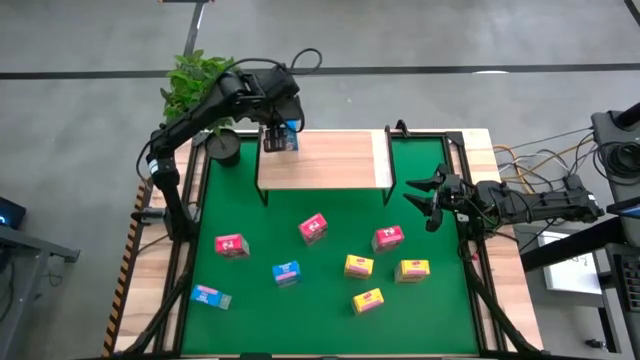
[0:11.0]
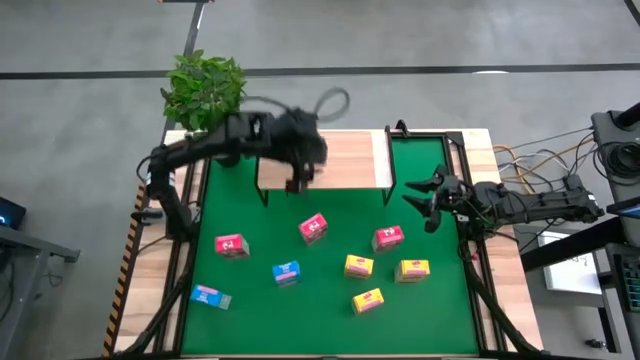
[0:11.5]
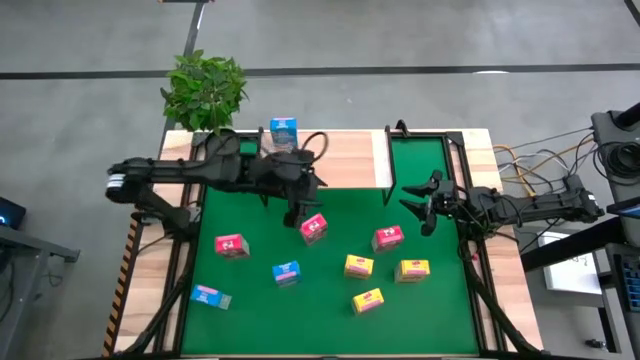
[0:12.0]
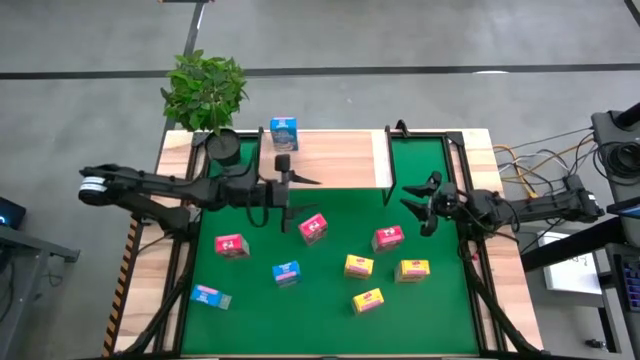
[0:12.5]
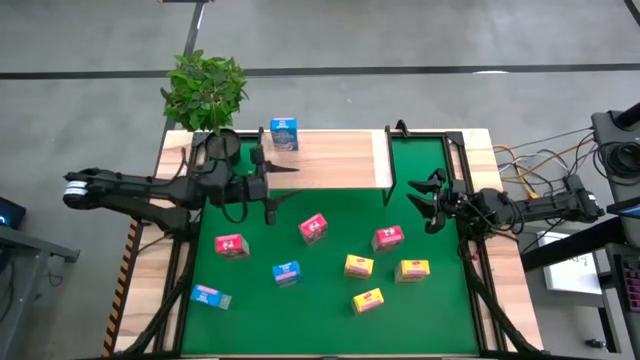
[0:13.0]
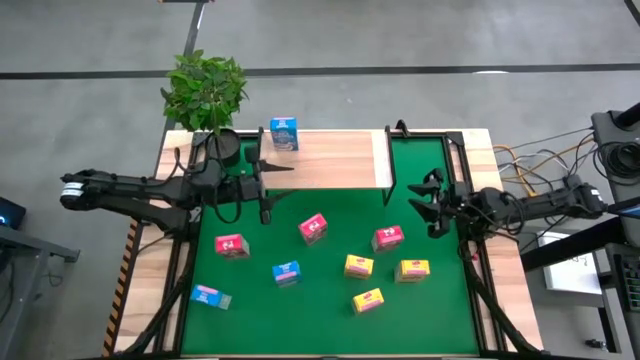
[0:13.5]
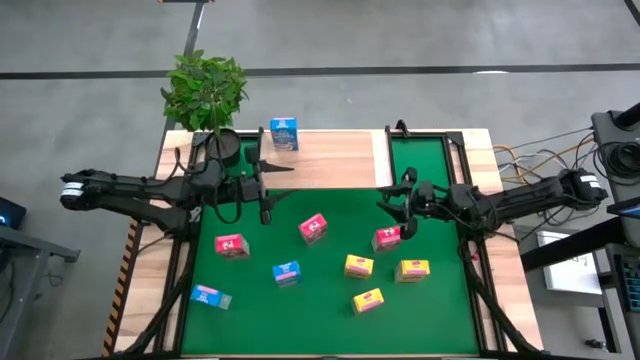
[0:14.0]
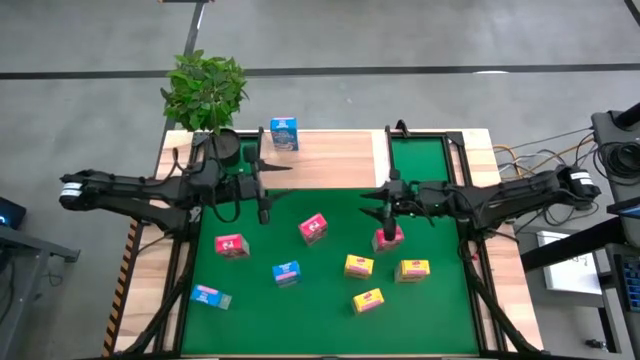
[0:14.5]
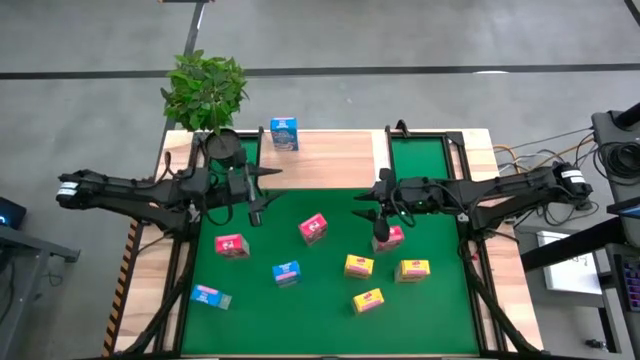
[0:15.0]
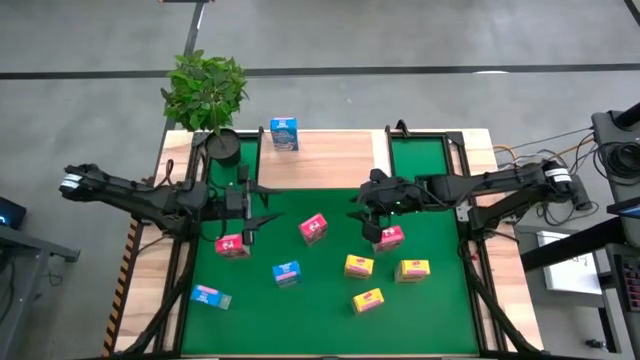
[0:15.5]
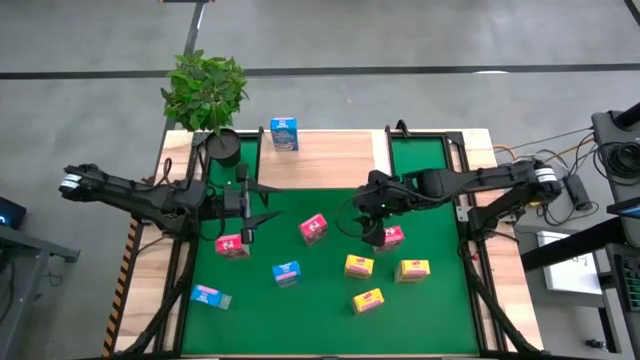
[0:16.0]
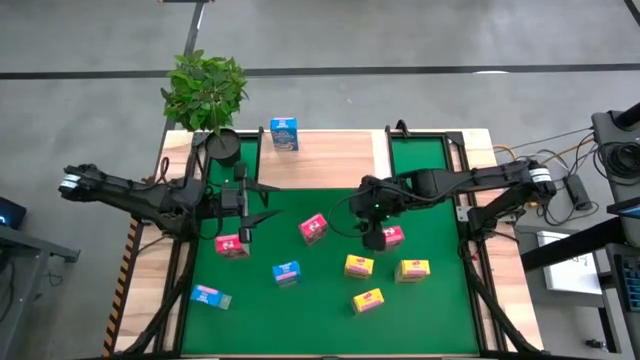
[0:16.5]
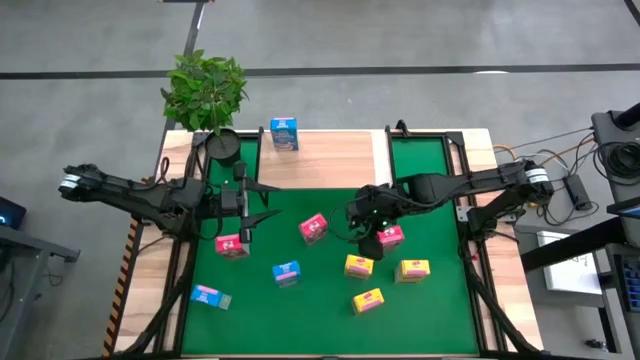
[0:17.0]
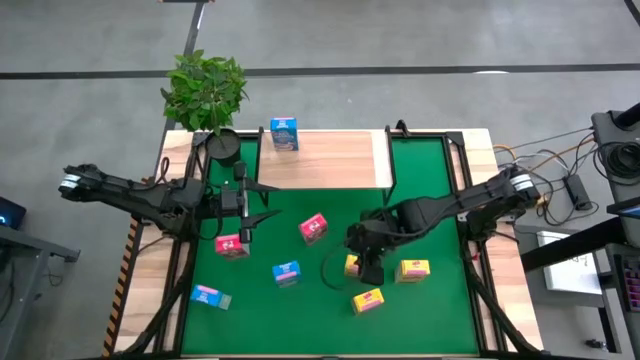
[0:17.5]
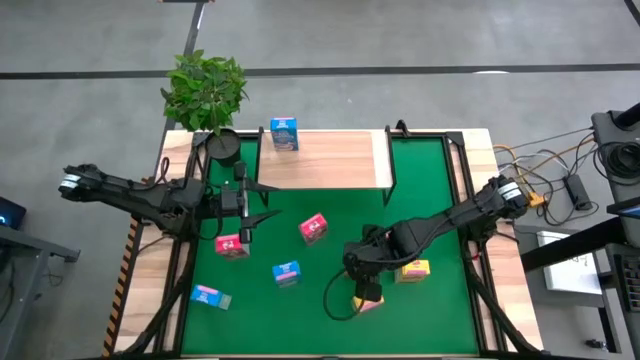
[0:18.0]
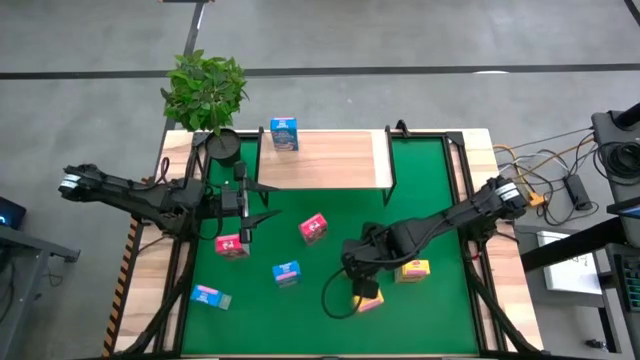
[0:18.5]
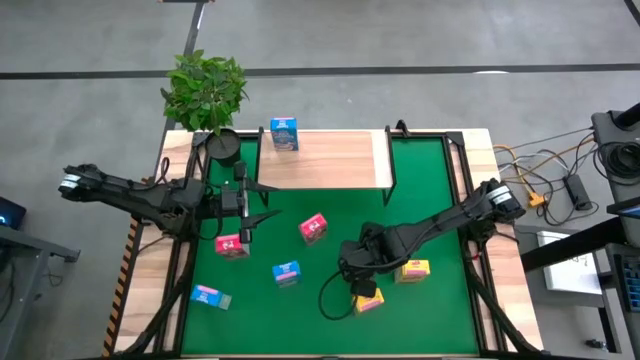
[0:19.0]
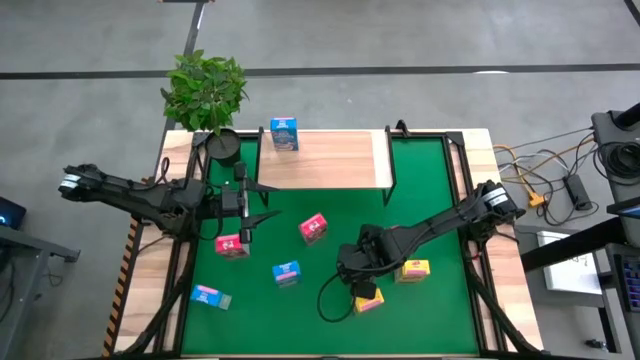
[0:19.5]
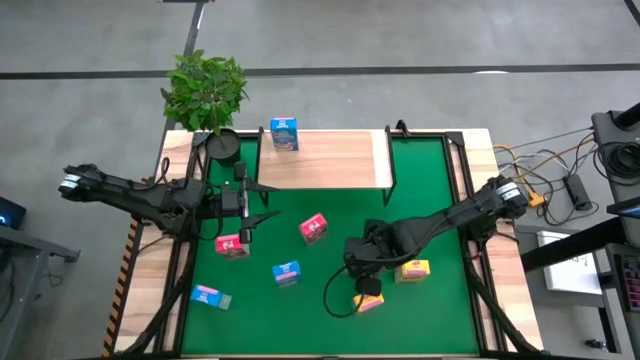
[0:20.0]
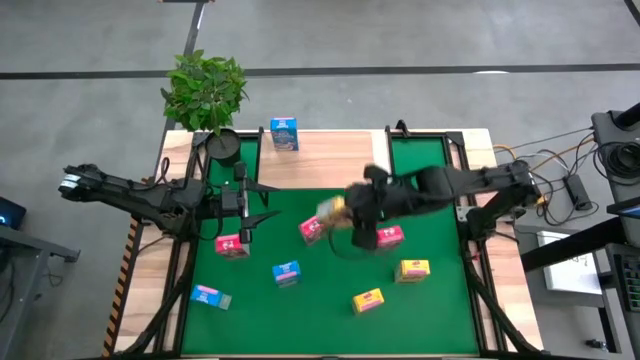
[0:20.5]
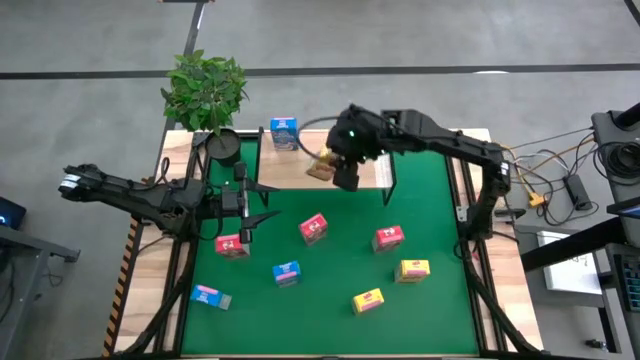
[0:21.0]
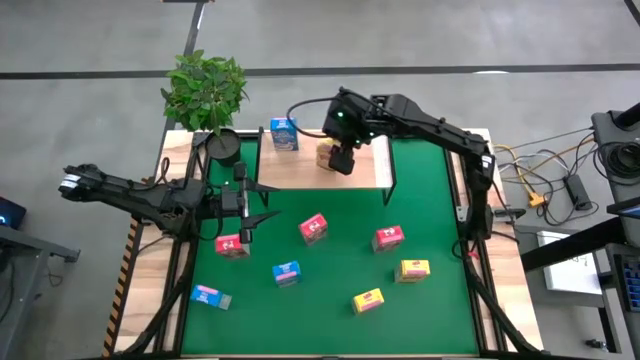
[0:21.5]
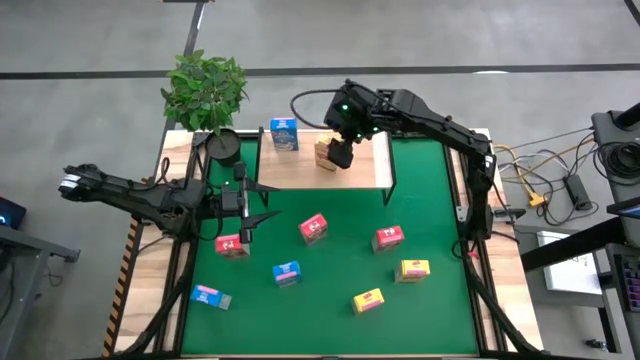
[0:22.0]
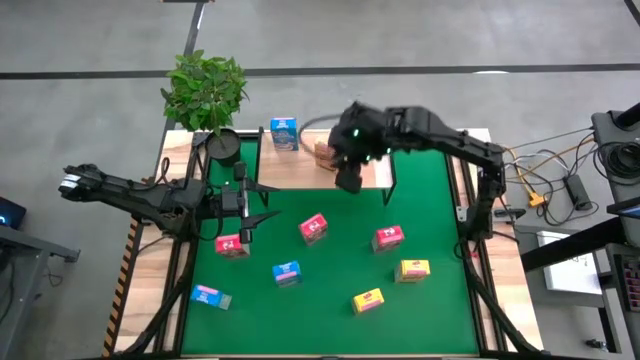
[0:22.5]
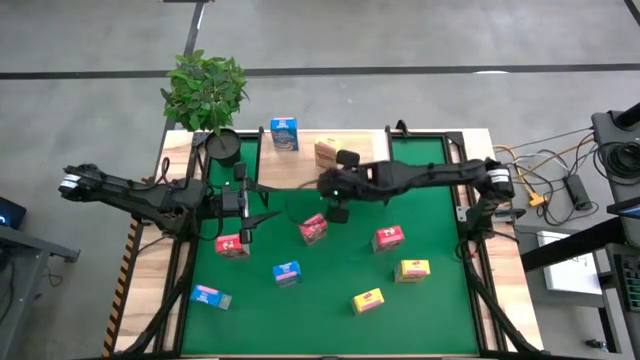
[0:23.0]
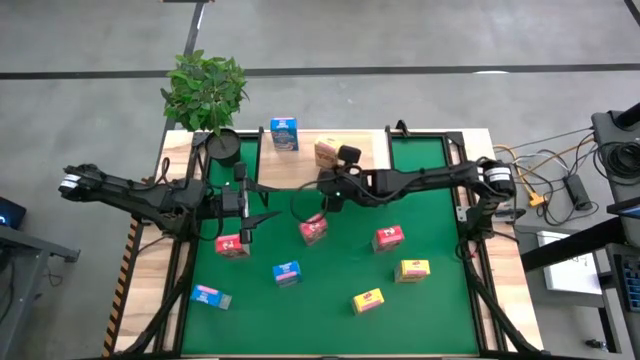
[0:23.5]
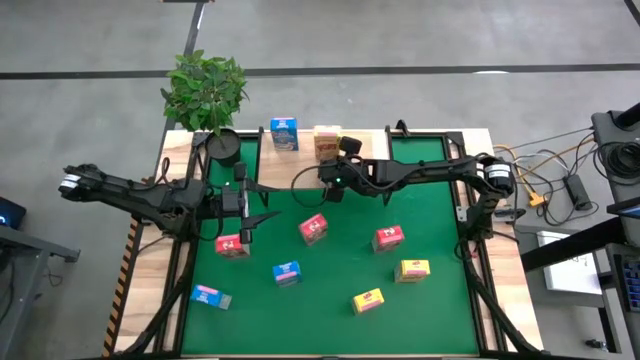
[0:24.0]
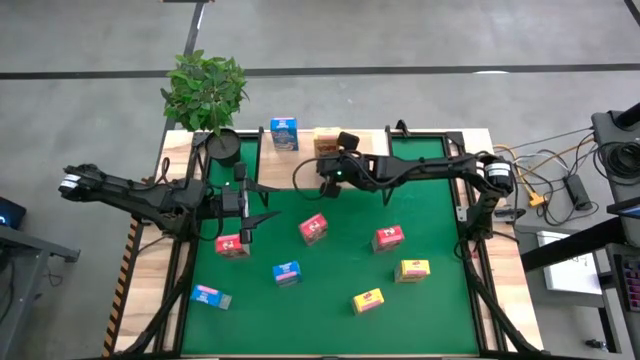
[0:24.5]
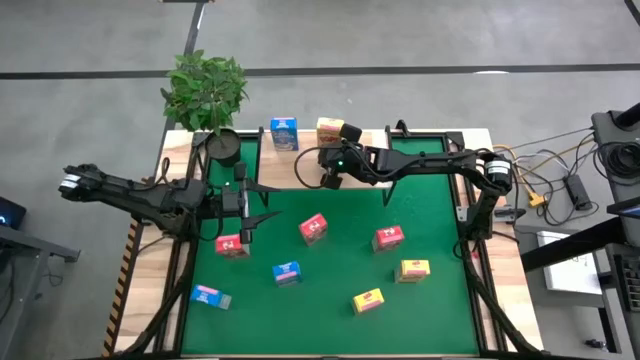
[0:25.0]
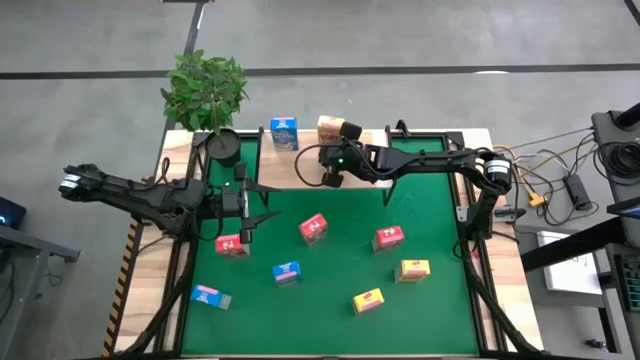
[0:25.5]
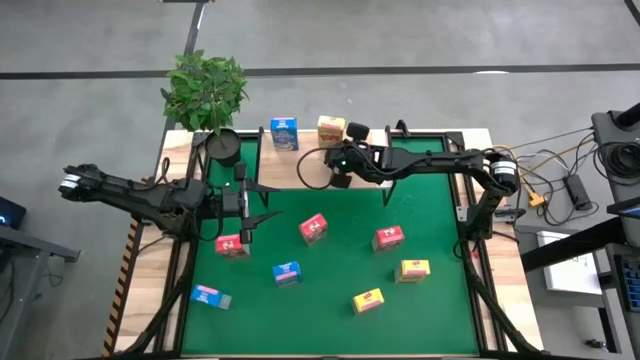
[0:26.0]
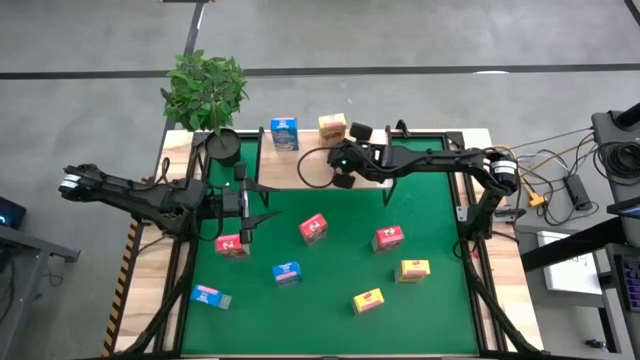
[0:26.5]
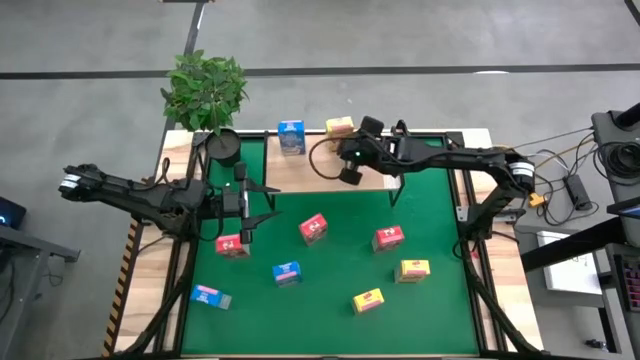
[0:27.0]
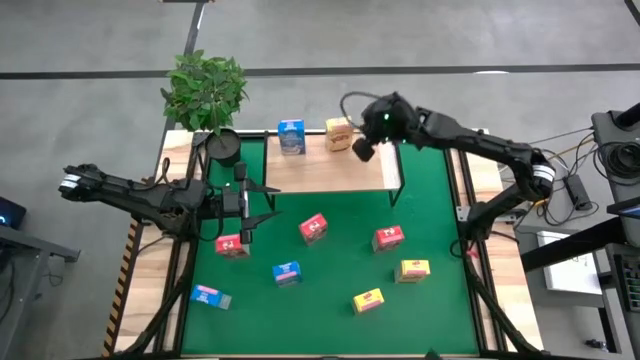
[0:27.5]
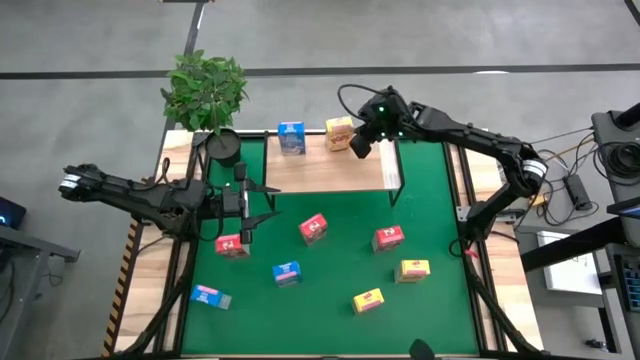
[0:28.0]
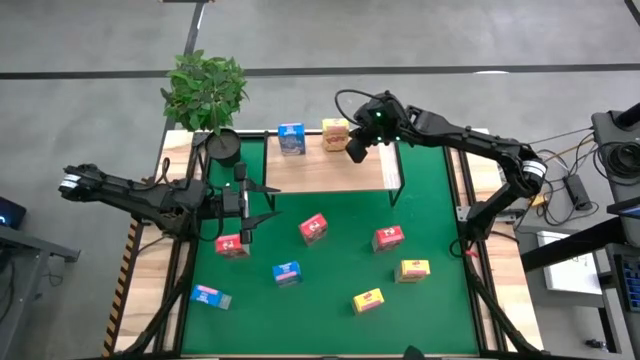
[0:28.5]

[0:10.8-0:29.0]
Task: Stack cereal on shelf
Put the top left yellow cereal box on the shelf
